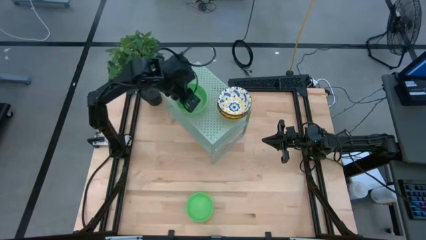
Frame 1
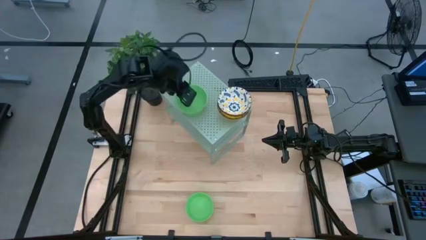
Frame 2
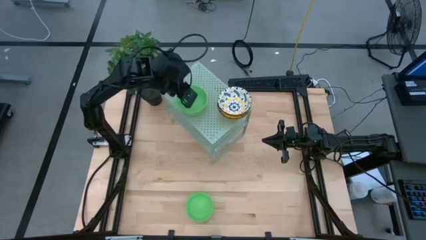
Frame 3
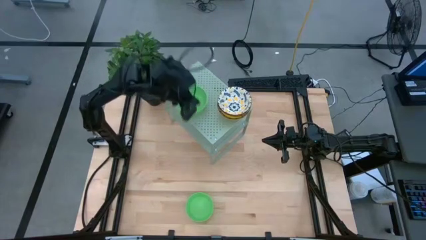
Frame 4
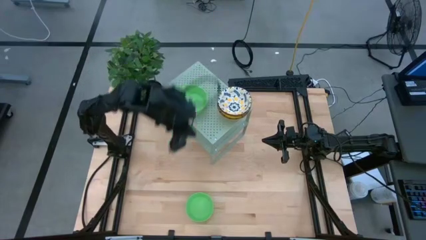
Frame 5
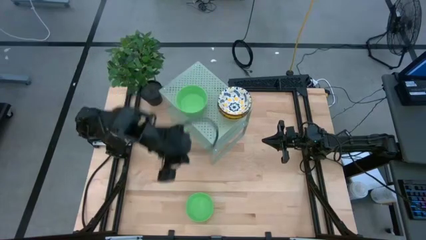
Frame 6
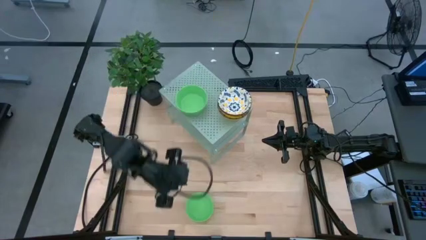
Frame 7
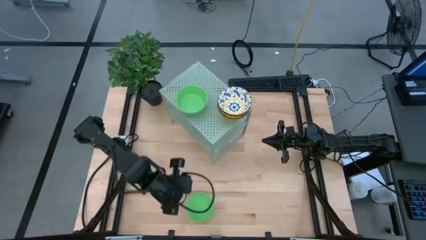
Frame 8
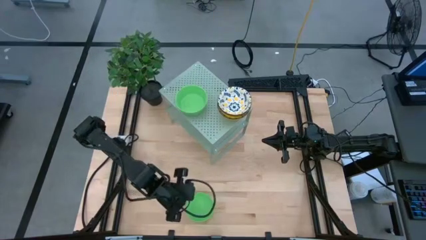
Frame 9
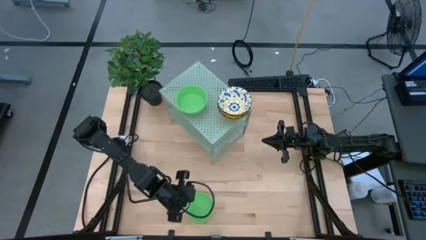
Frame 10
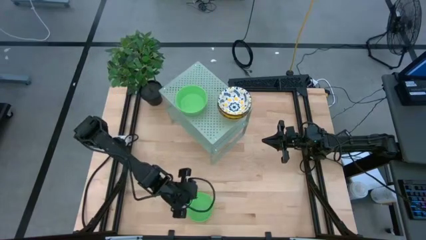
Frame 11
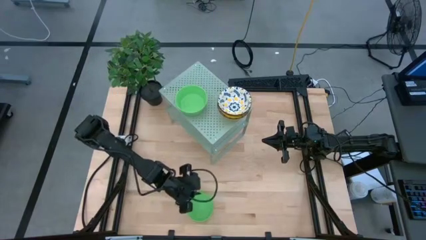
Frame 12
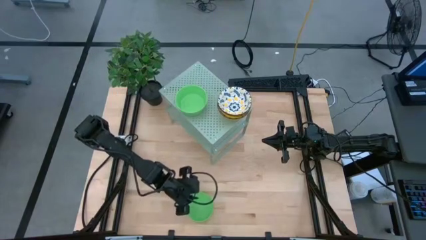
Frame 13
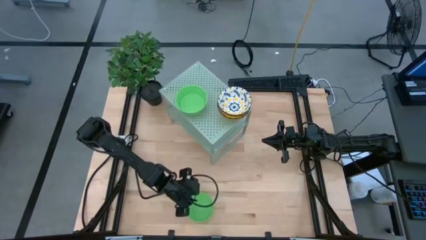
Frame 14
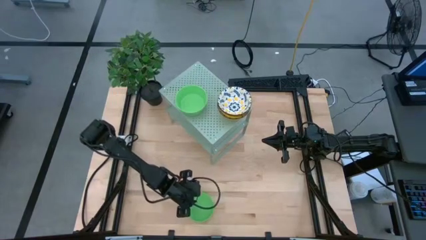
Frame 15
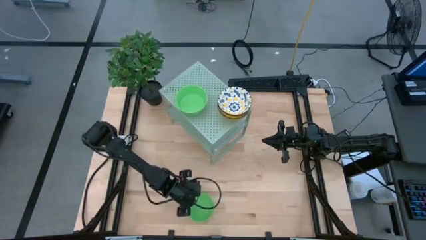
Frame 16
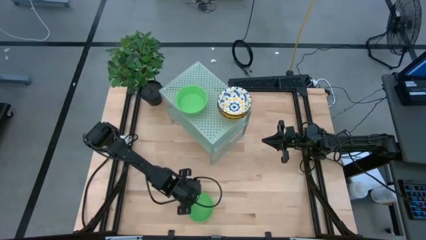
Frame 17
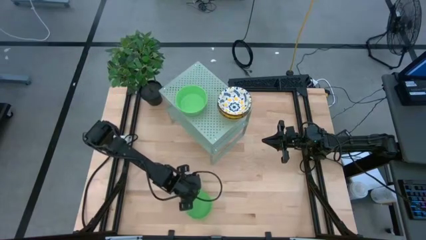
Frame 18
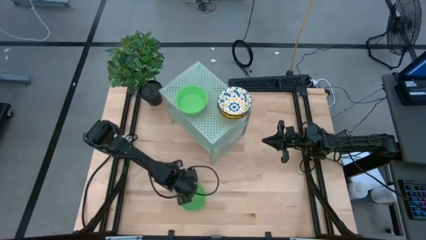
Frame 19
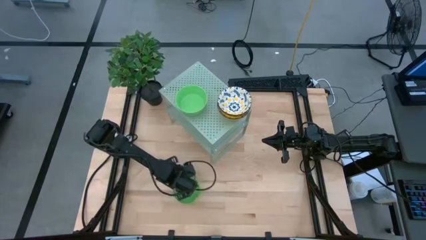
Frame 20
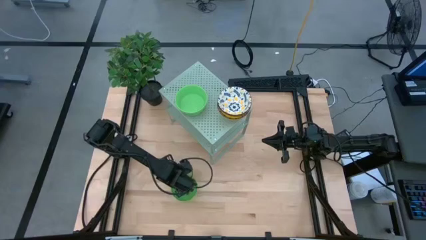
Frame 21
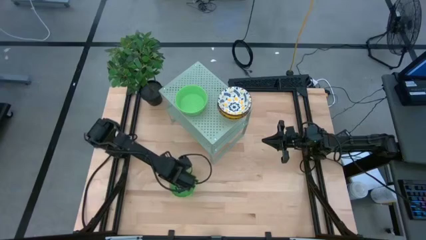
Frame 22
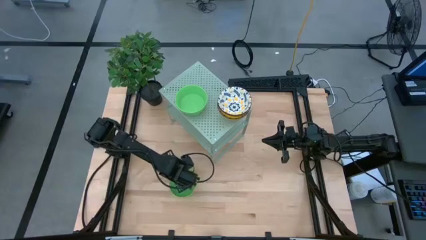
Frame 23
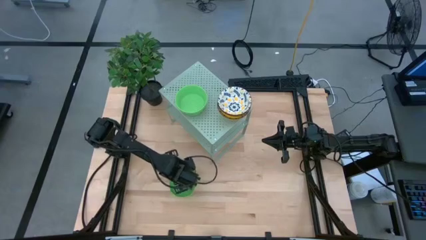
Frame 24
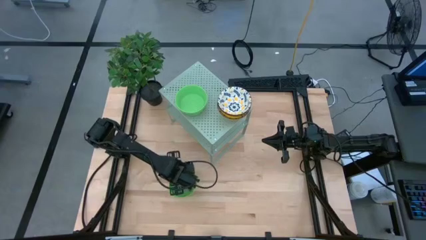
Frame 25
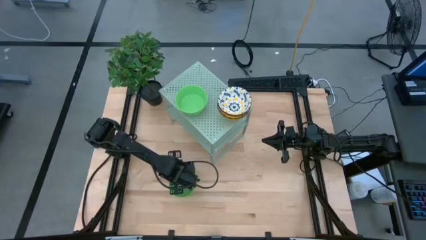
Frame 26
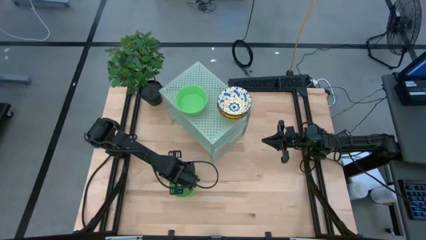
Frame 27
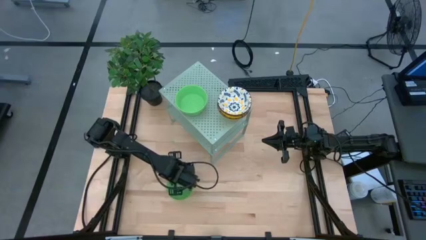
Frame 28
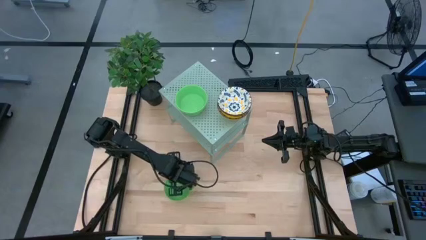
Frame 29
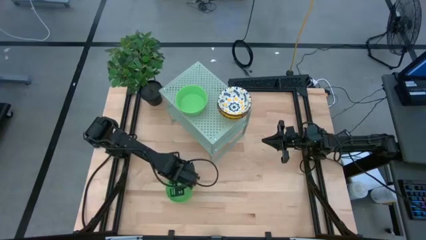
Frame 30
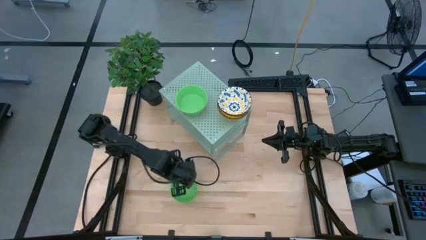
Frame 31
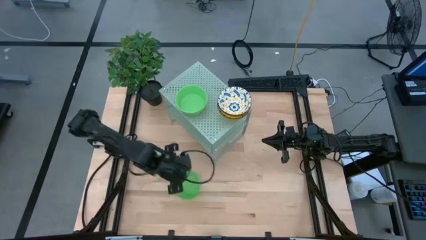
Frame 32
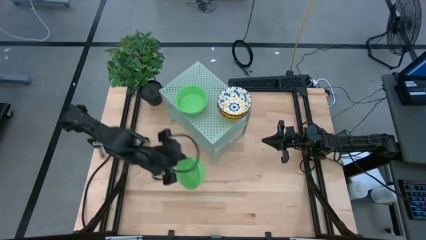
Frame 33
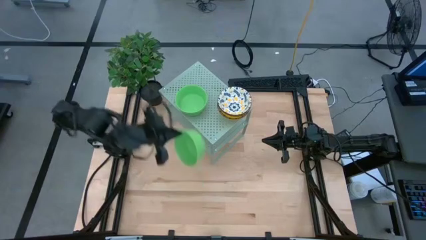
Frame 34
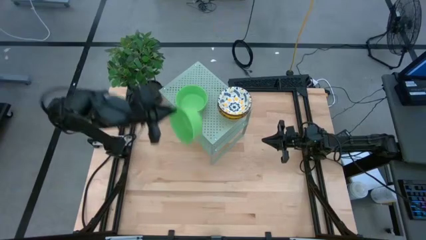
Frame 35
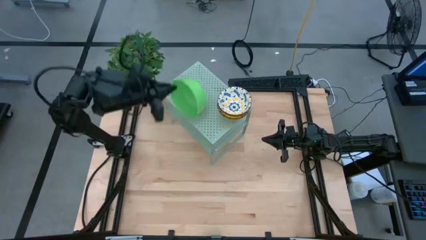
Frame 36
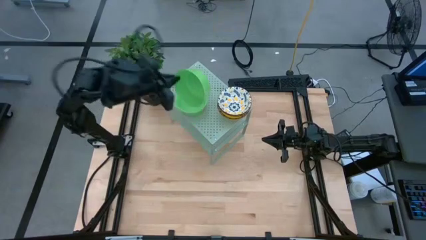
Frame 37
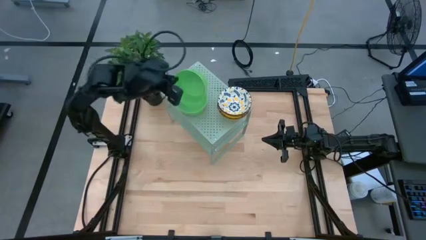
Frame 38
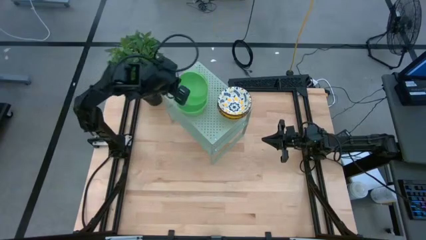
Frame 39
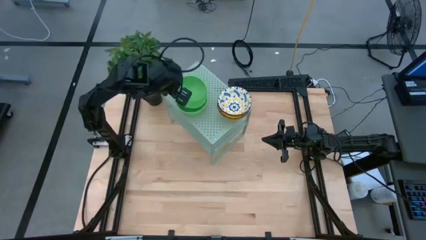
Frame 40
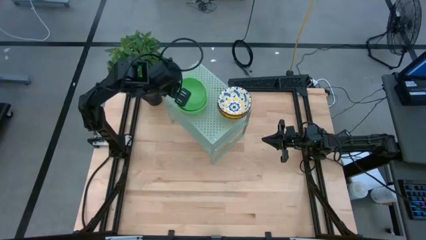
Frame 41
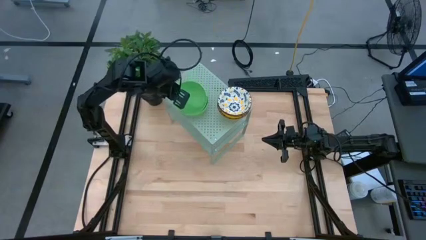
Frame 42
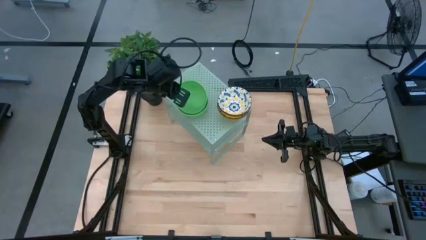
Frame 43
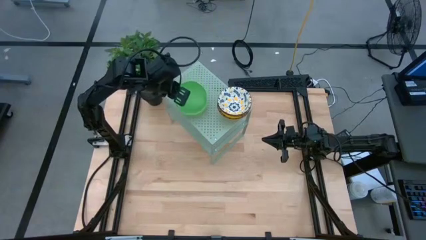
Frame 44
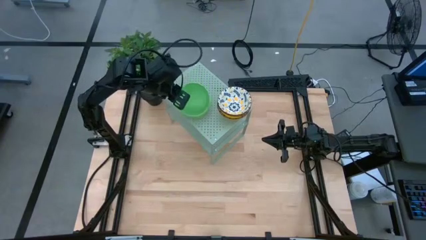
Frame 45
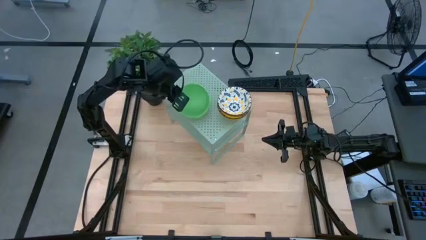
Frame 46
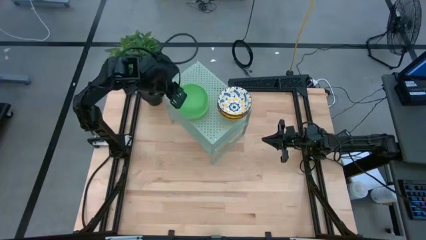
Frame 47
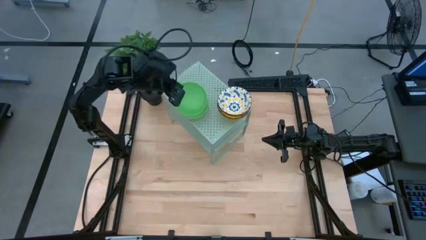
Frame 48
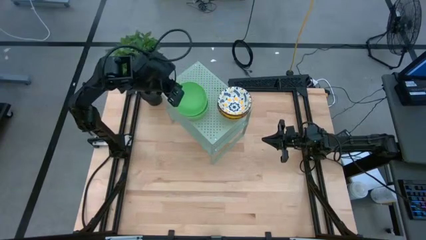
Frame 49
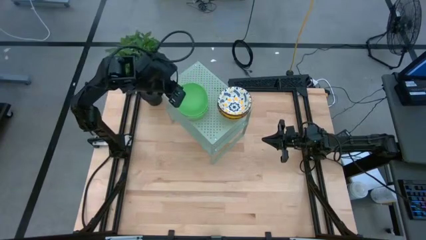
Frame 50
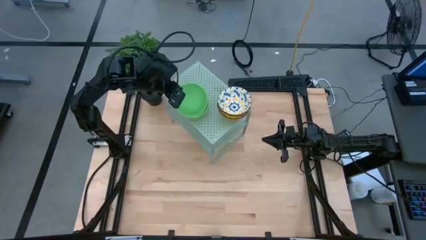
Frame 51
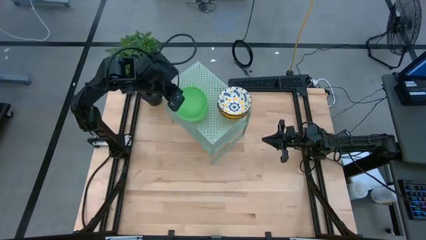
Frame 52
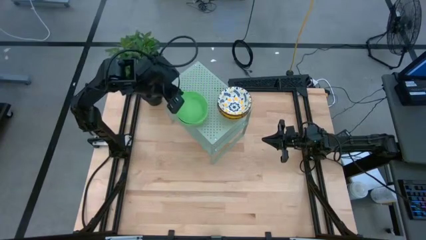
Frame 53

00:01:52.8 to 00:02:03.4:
Task: Pick & Place Mini bowls
Stack the green bowl on the green bowl on the shelf

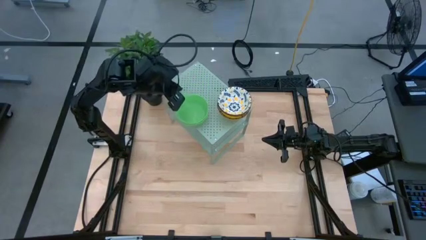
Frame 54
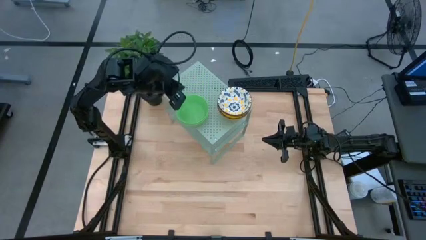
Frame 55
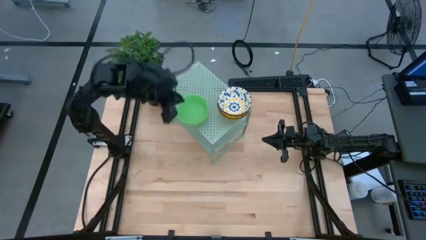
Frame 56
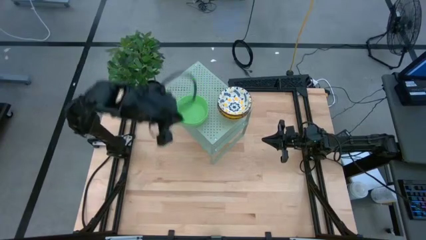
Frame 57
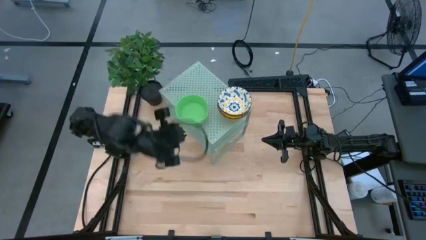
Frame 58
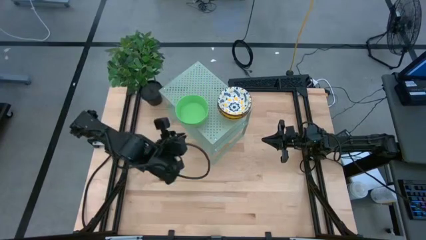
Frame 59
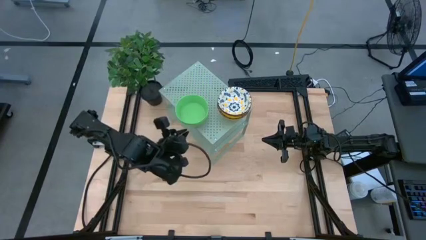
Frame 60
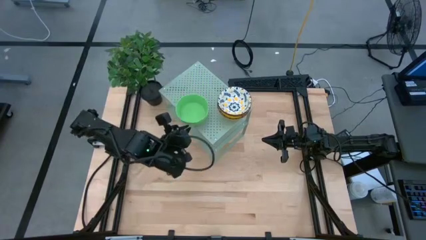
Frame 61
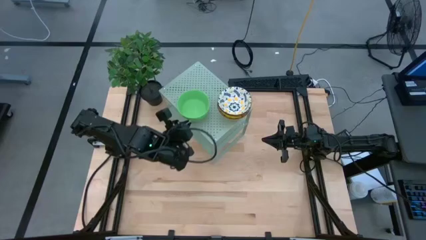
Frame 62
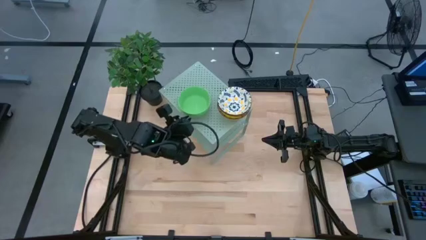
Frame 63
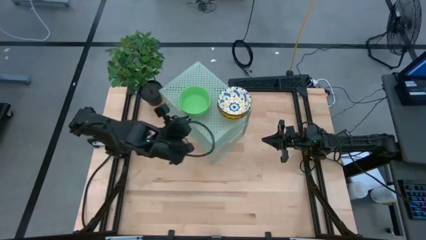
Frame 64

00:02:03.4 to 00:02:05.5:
Adjust the stacked green bowls on the shelf

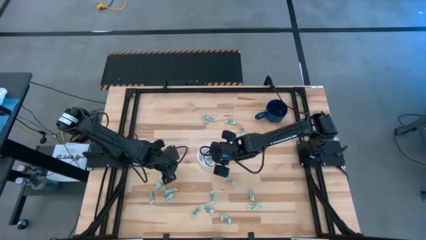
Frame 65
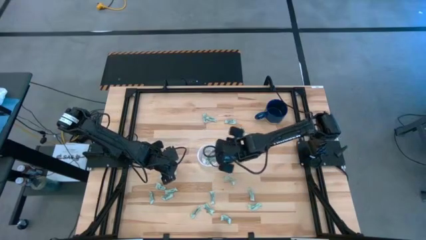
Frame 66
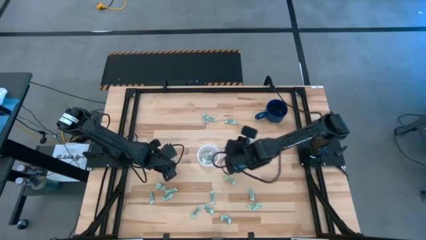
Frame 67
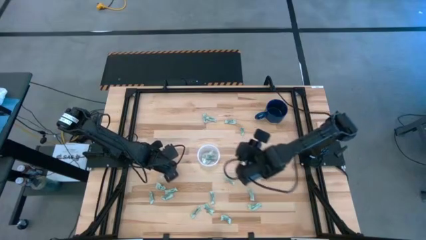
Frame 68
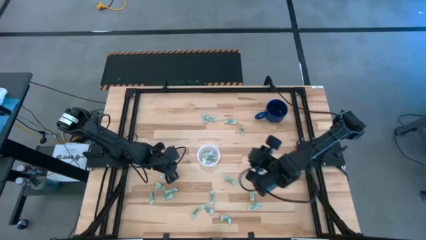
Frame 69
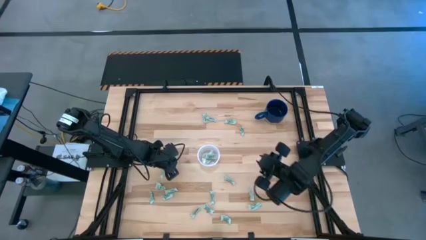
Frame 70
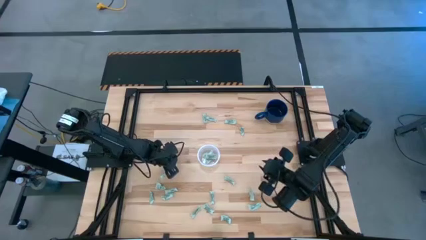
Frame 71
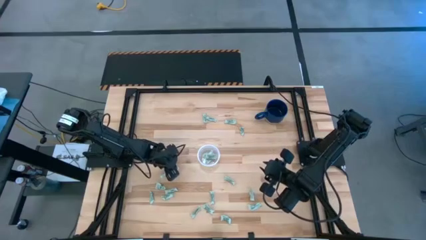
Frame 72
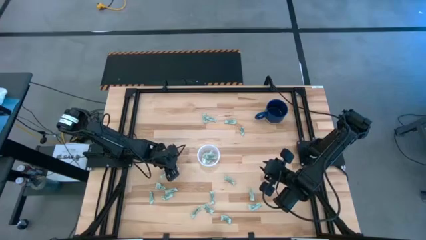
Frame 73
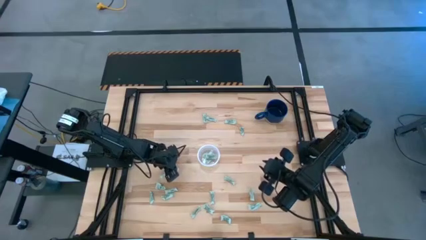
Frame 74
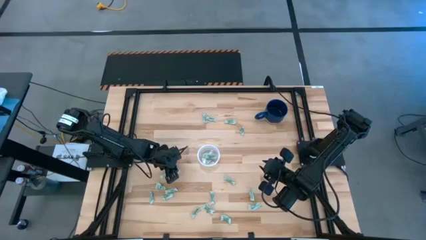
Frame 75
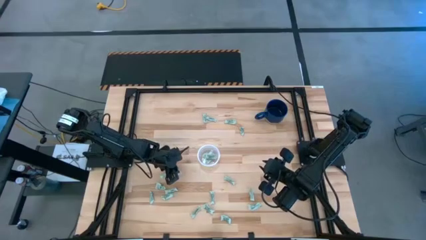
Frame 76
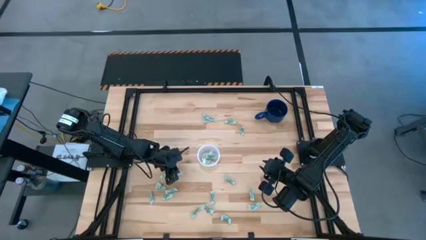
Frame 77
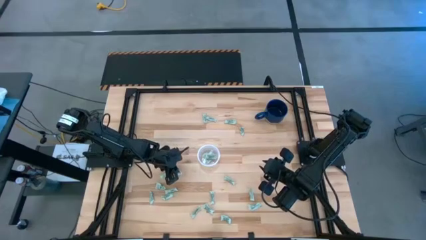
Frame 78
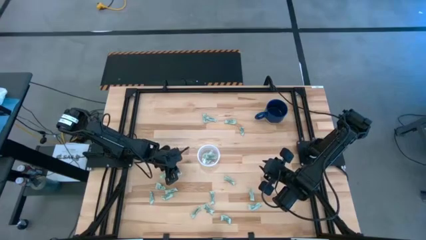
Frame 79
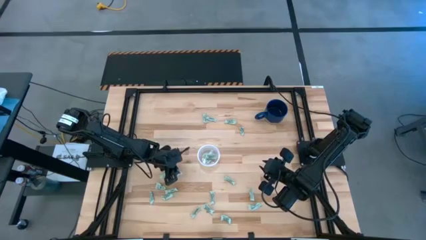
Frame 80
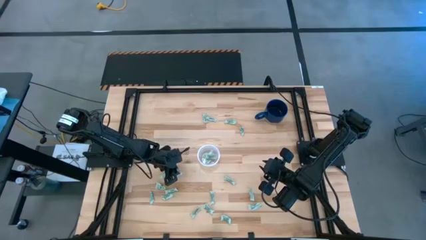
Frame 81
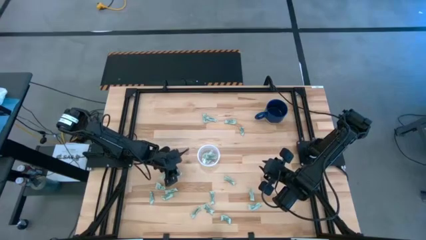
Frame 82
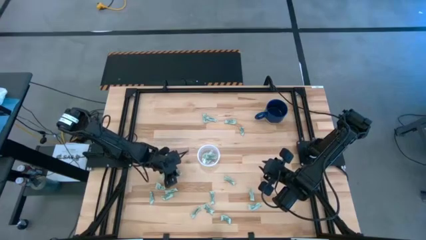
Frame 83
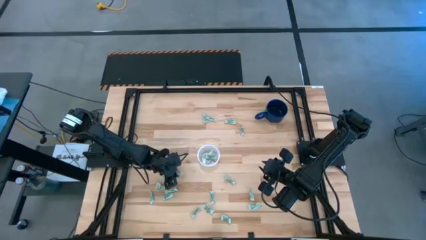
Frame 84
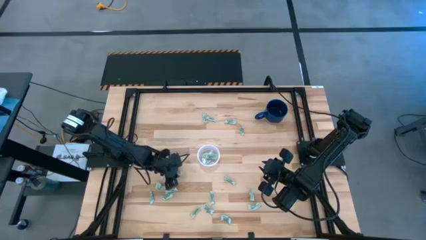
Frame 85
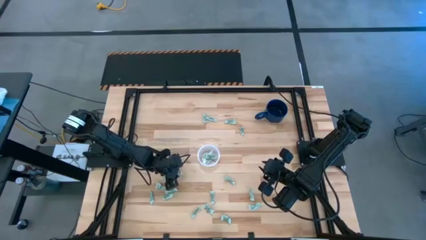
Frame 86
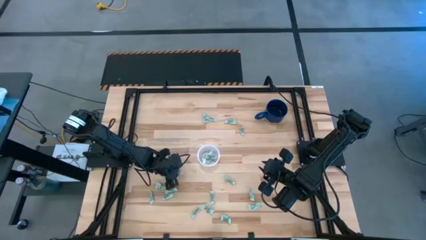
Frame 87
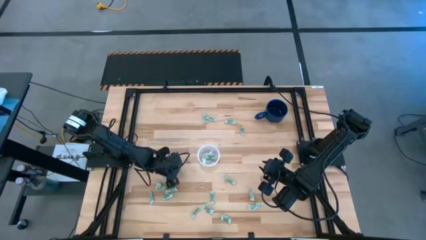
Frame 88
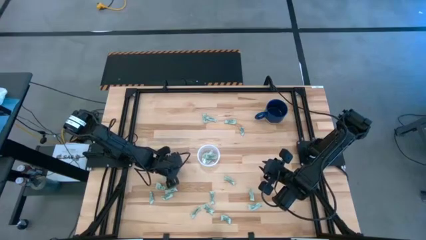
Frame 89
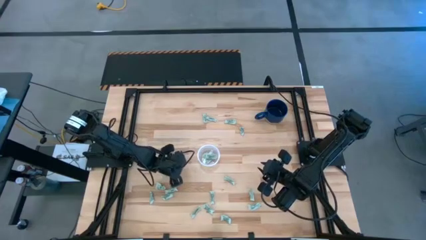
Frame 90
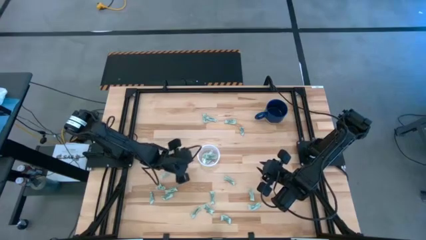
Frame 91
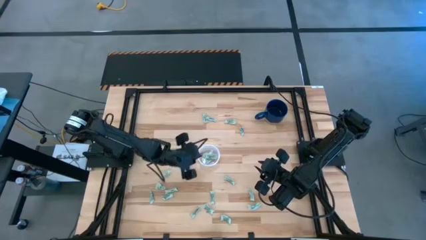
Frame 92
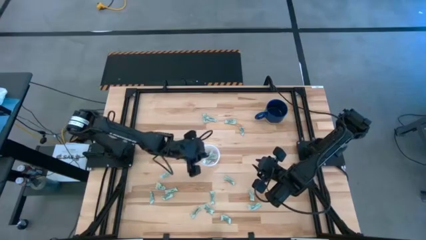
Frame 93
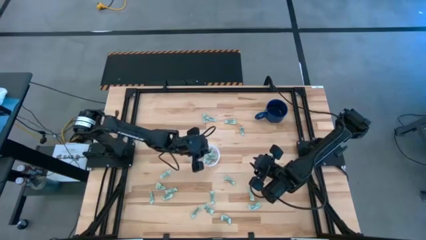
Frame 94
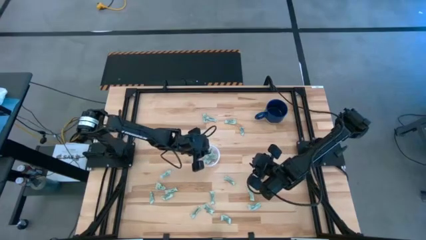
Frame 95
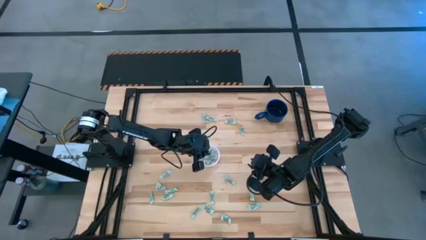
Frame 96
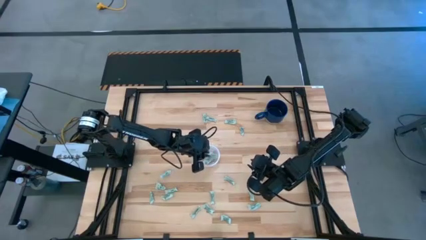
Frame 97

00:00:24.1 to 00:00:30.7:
Task: Pick and place items into bin
Put the stevia packet into the transparent bin
